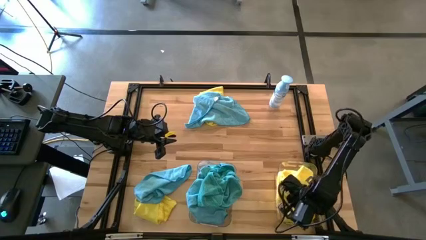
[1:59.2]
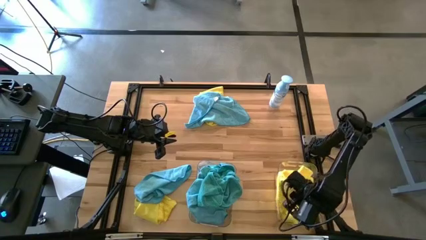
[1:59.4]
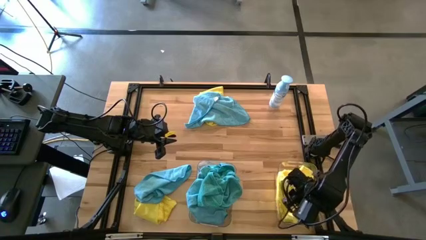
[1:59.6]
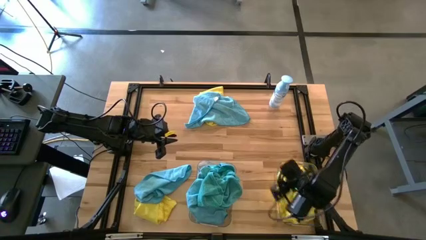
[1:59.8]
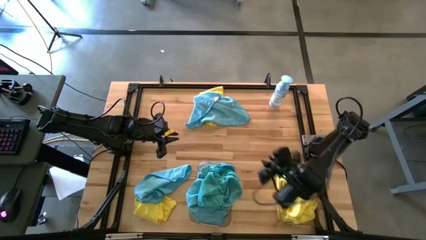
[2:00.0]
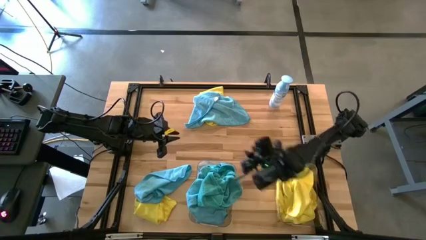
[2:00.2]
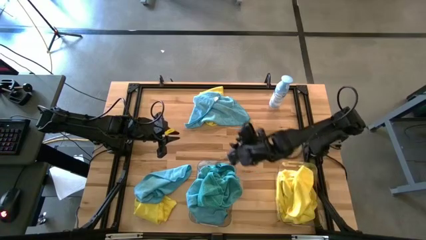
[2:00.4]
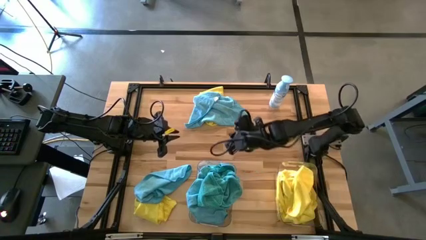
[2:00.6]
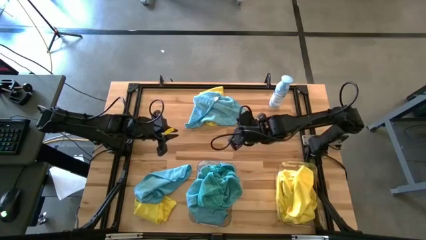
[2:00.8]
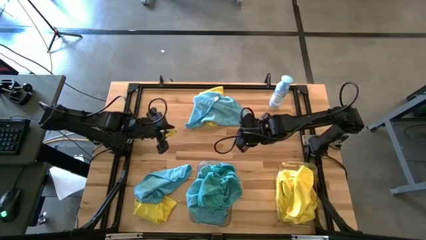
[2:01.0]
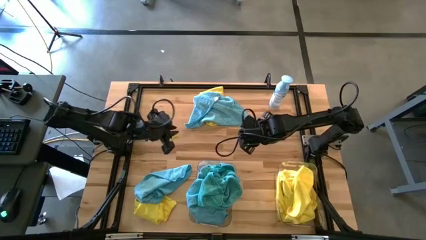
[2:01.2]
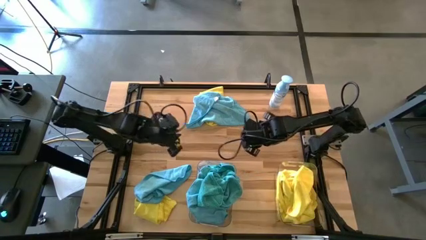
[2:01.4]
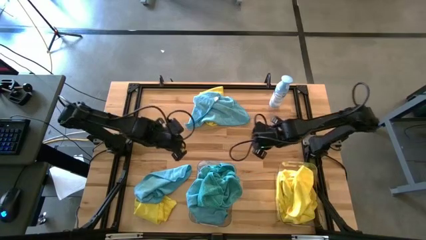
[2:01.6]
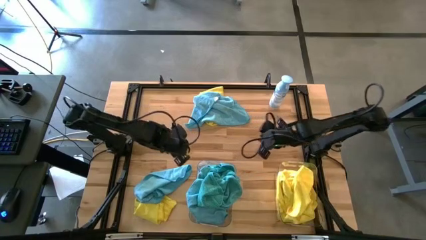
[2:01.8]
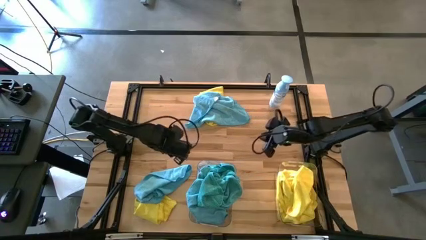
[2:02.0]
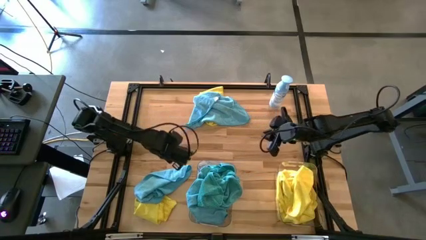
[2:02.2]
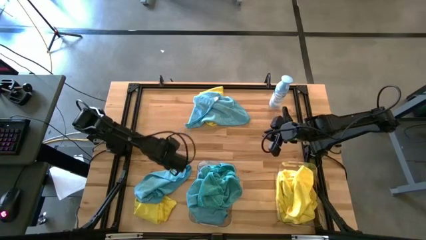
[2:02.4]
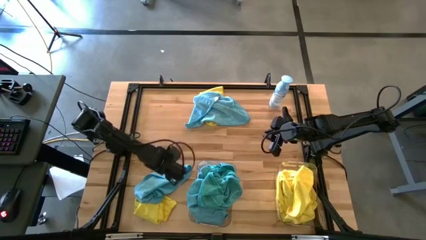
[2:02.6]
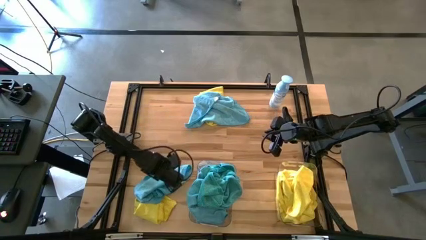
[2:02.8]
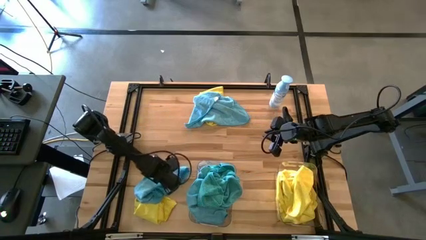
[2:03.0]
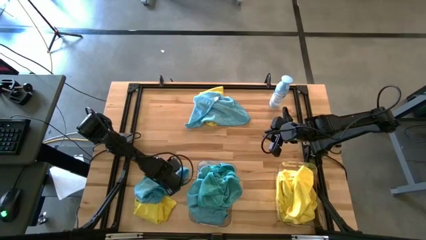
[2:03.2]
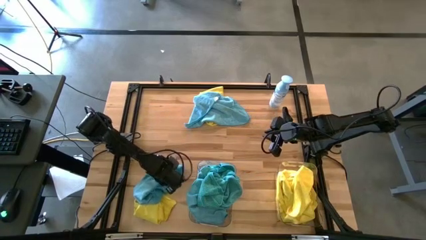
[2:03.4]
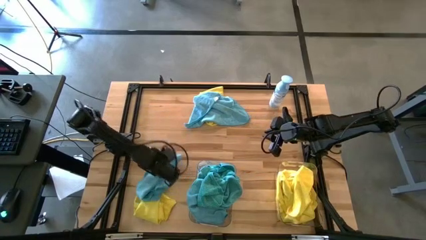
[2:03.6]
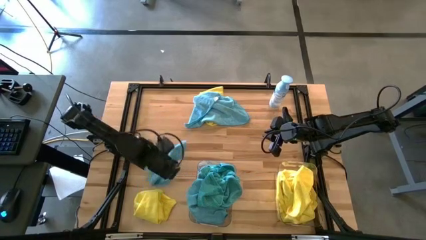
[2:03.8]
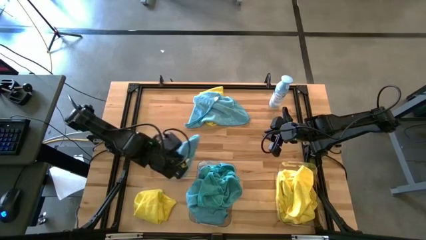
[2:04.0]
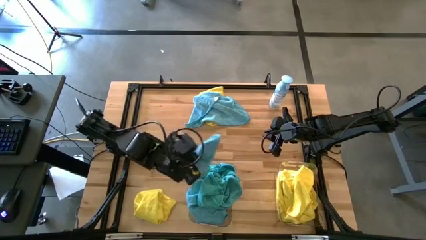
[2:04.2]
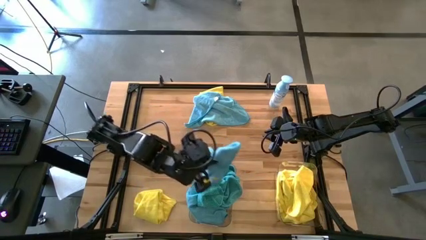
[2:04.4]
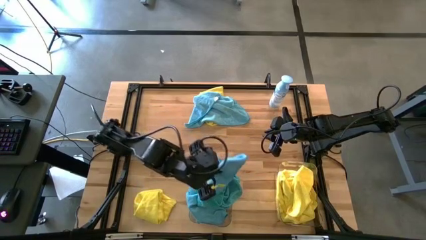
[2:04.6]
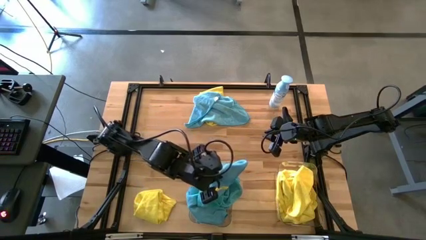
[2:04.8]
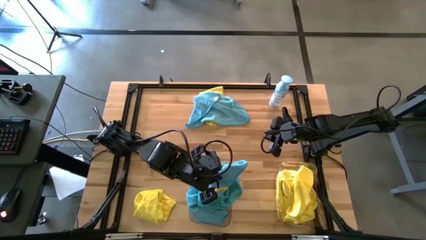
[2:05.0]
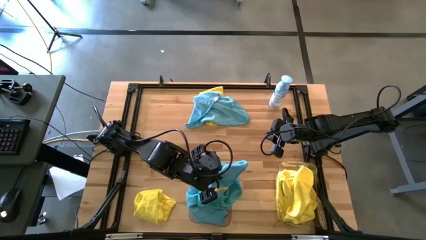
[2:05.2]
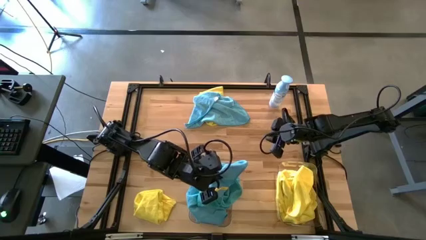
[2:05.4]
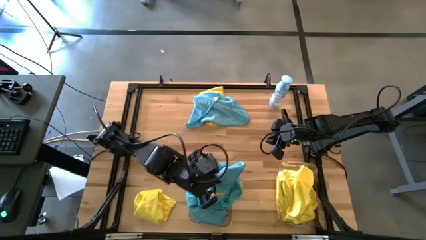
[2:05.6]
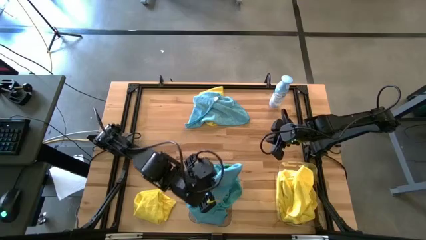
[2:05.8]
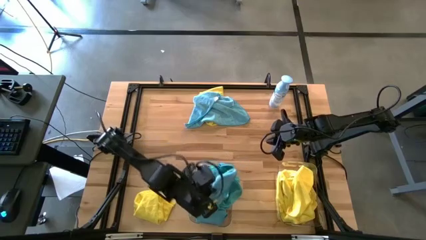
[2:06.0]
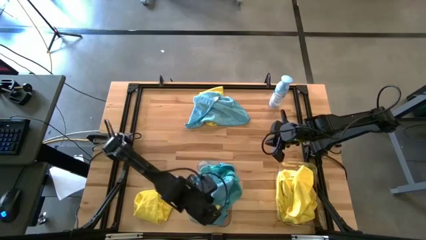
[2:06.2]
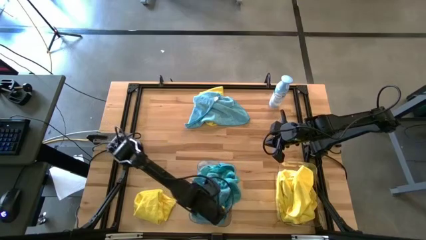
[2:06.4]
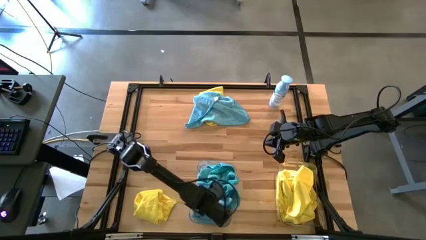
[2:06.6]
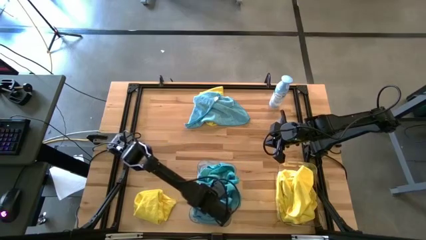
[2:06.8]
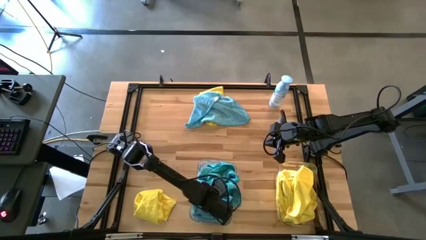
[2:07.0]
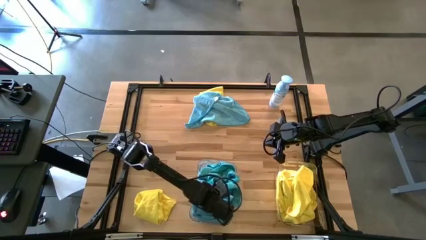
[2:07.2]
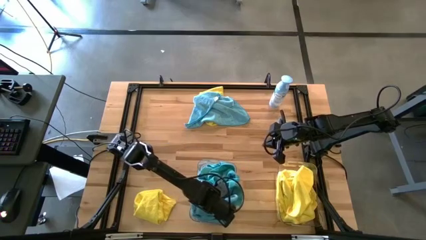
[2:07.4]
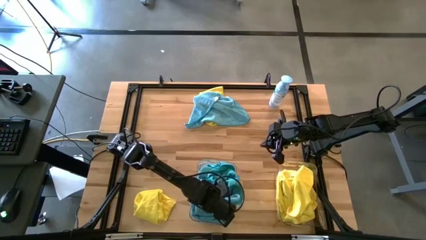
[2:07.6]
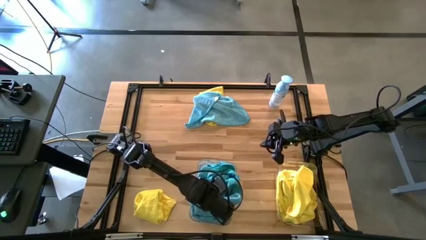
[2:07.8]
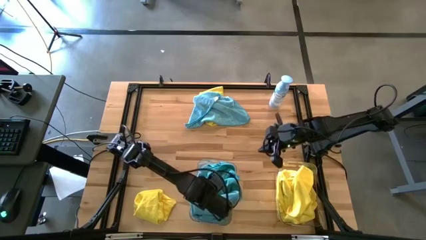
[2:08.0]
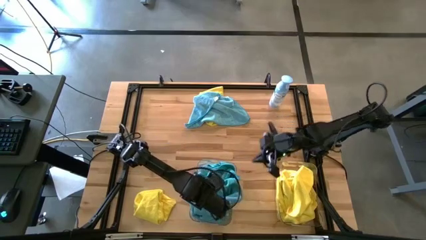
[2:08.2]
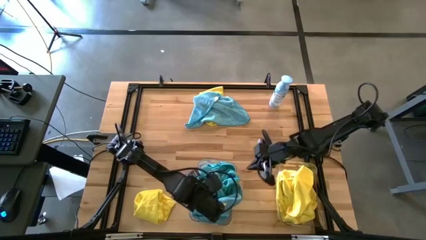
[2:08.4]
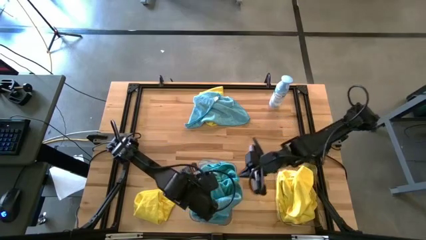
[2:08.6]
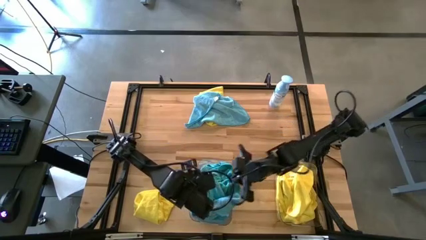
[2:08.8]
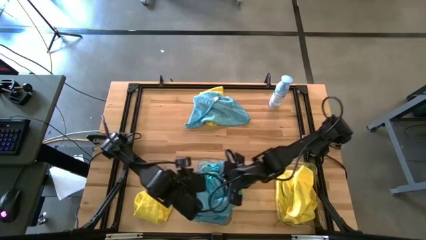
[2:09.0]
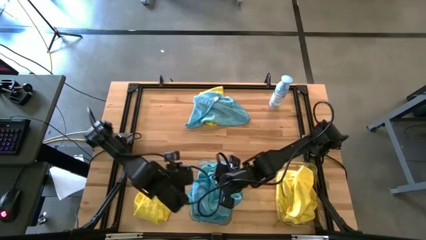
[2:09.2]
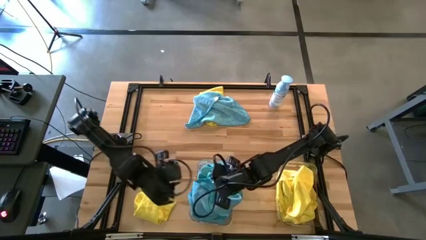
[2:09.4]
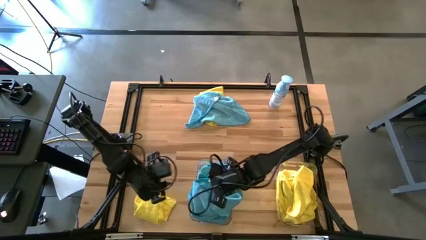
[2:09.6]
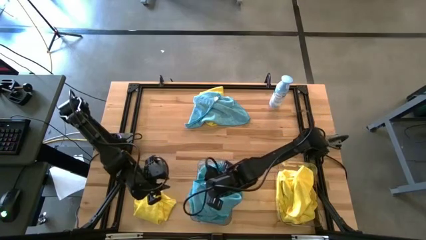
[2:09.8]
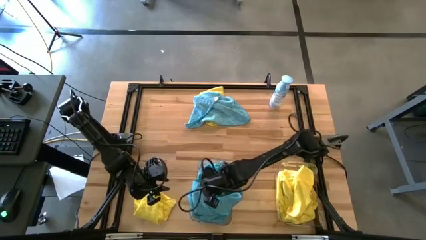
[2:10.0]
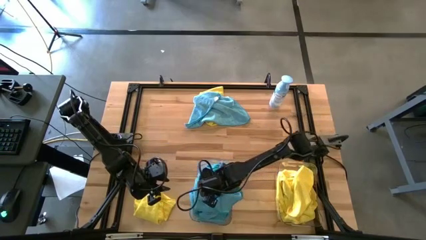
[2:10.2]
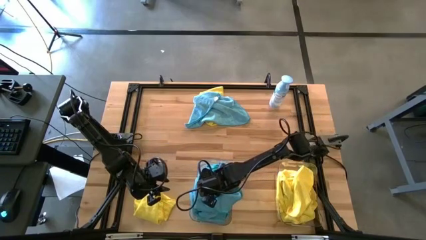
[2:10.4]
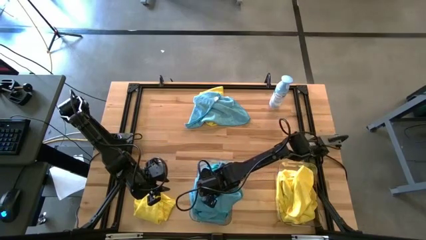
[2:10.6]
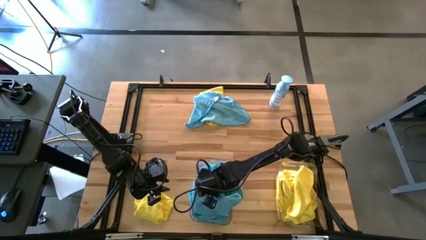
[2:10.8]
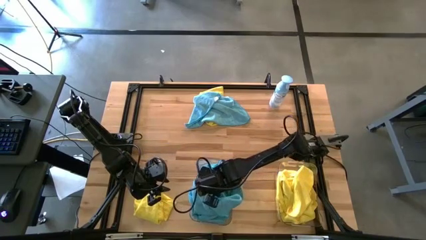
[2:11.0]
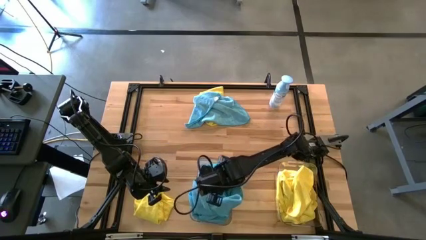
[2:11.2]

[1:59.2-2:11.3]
Task: Sort microfiber towel by color & place in baskets
Put the blue towel into the left transparent bin
